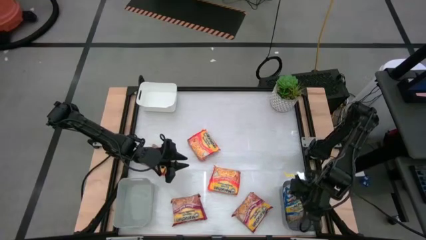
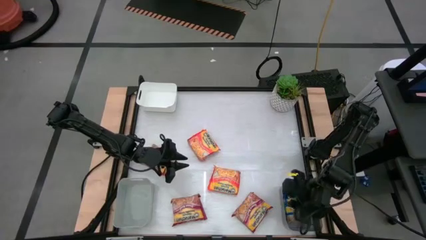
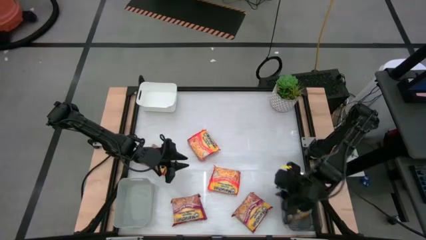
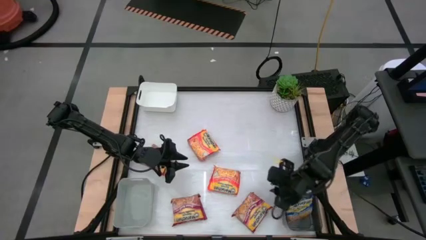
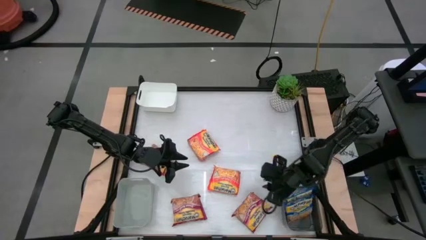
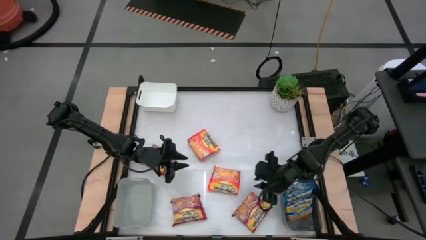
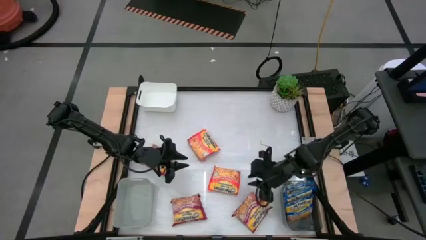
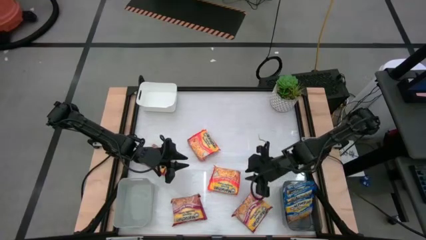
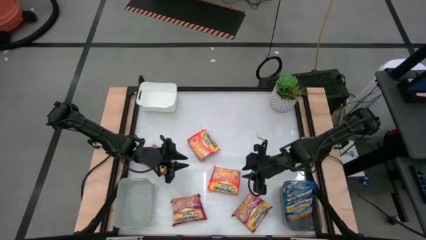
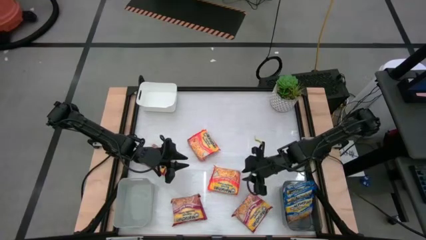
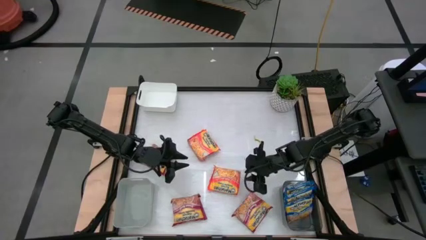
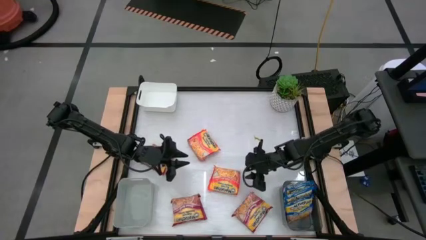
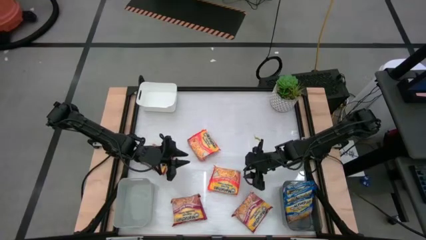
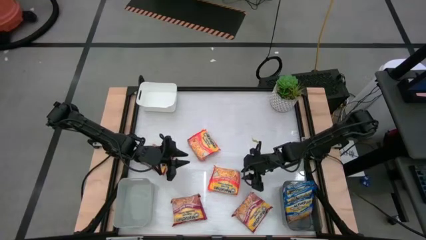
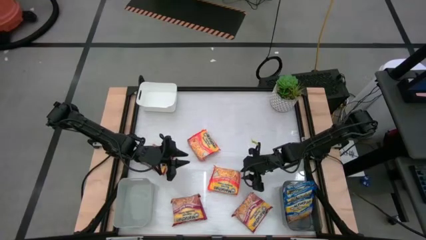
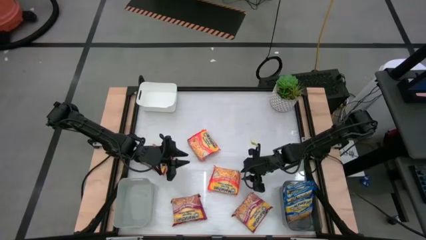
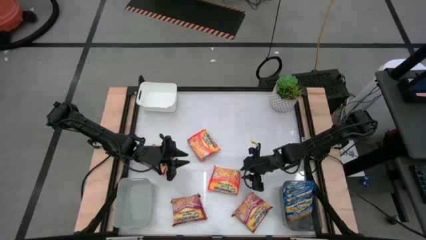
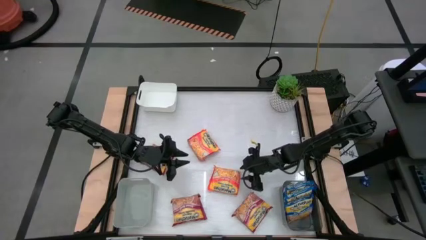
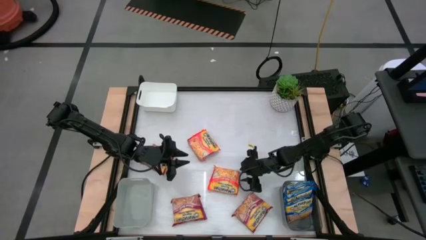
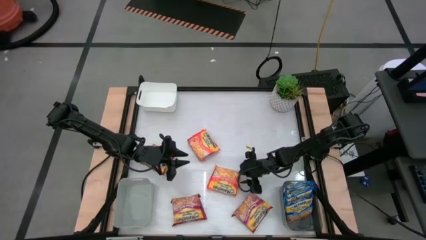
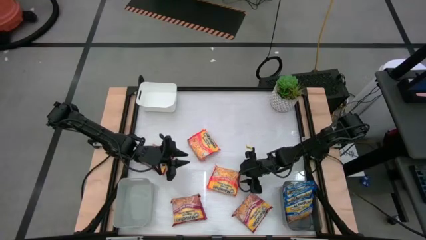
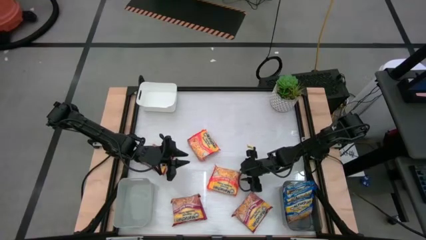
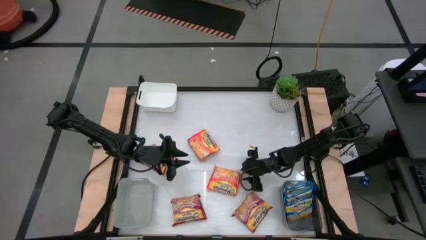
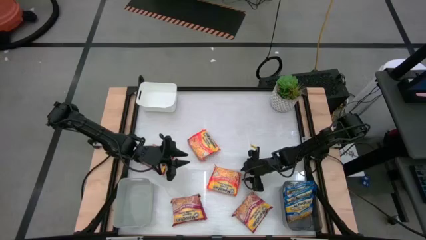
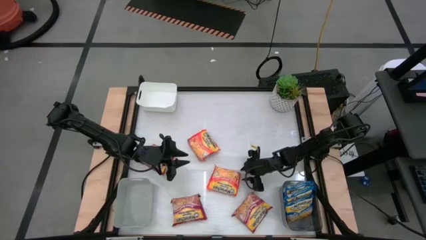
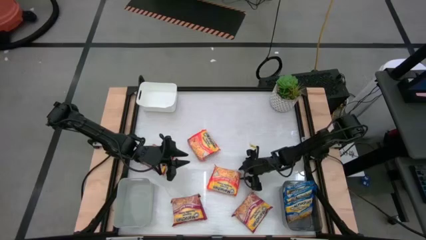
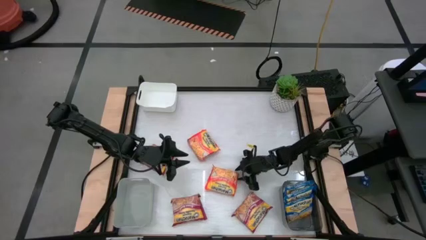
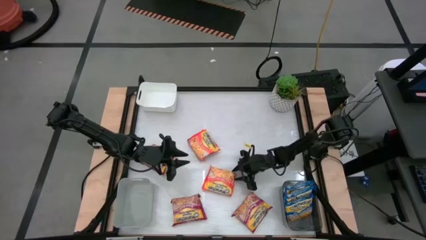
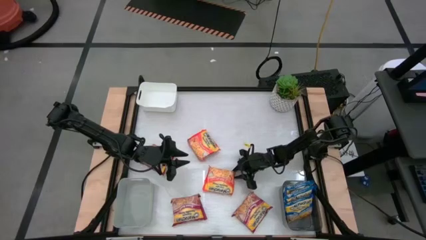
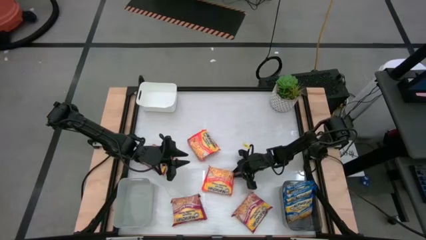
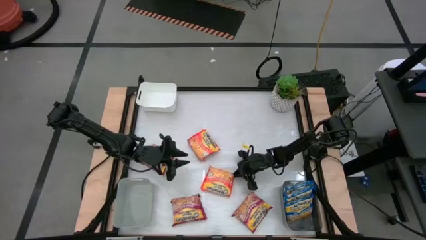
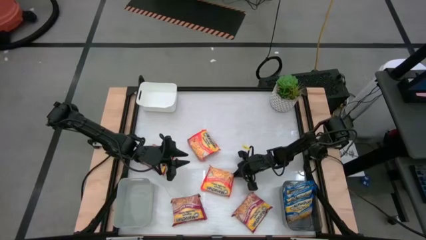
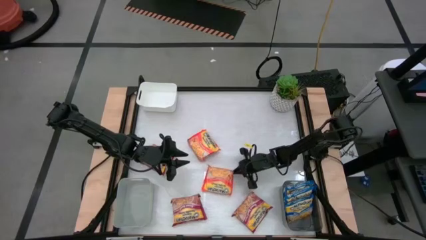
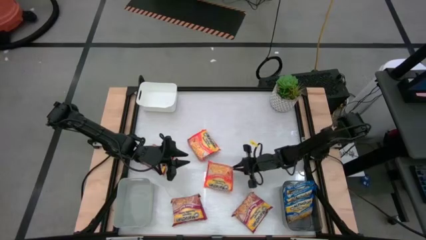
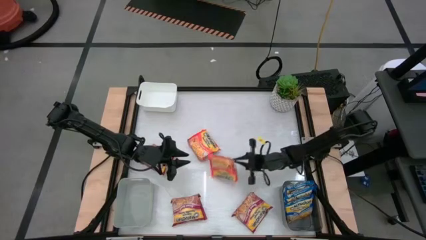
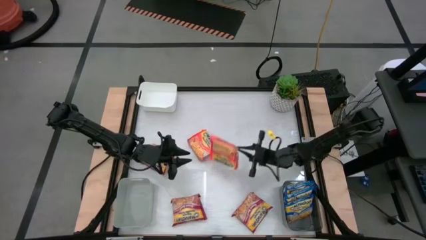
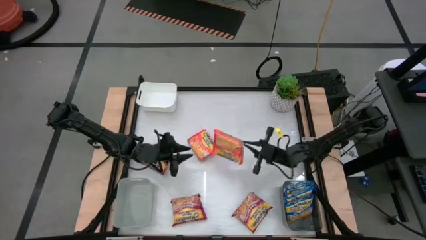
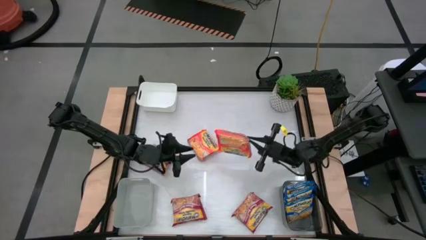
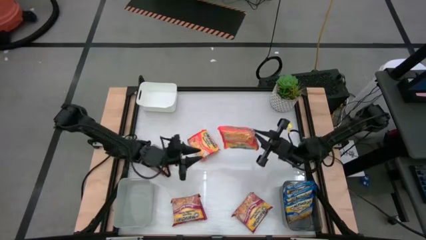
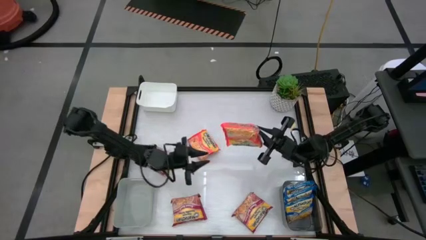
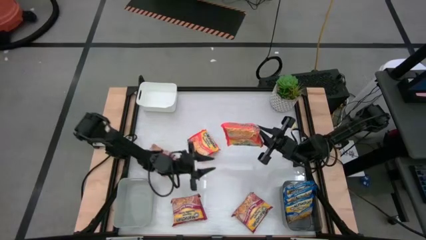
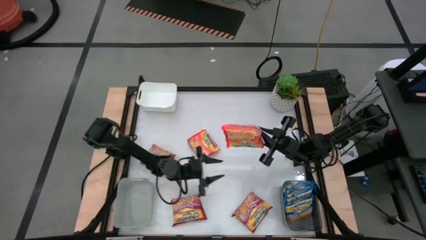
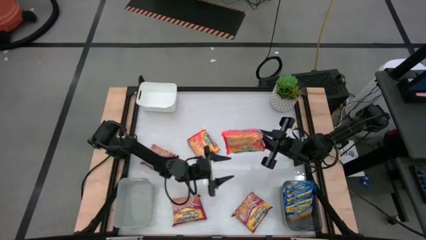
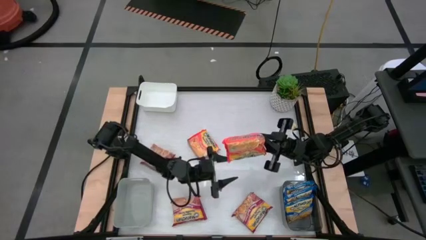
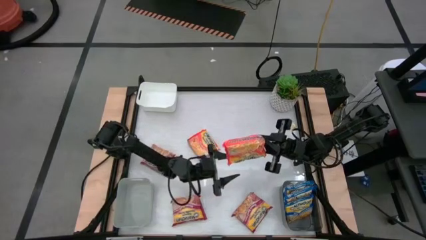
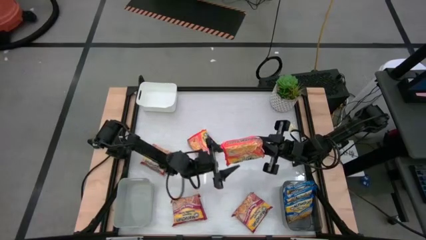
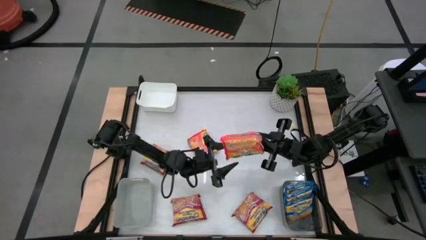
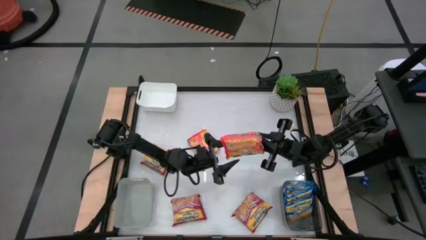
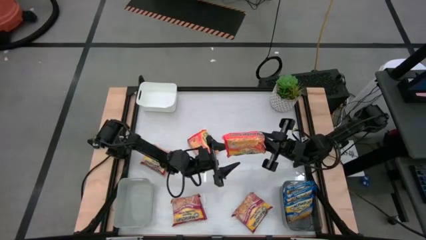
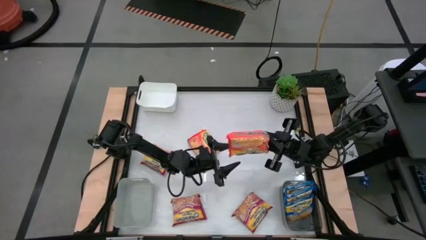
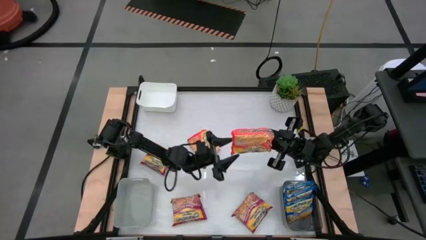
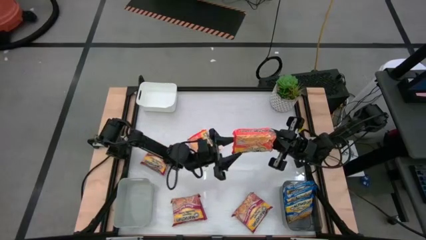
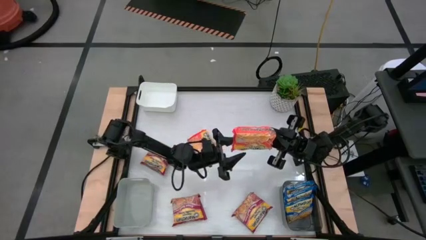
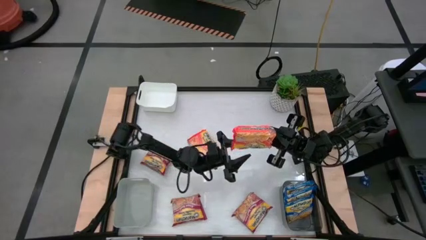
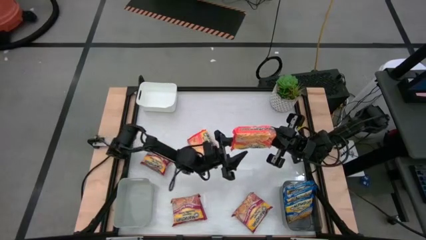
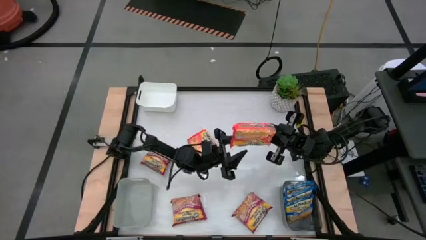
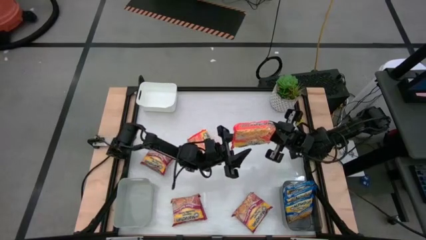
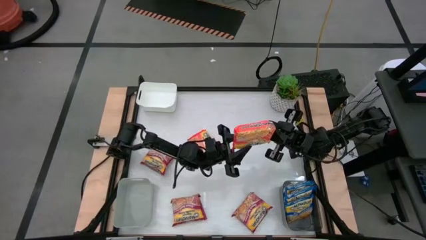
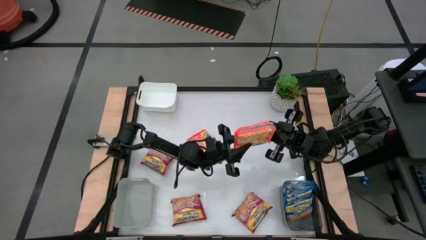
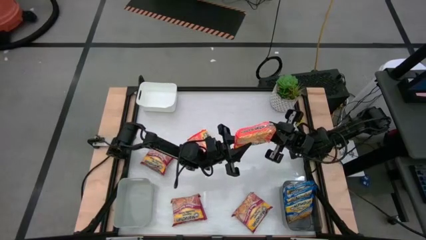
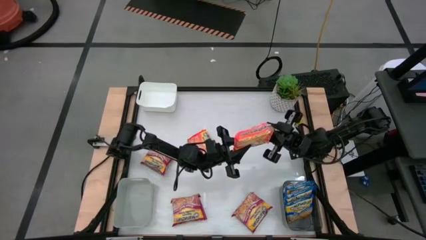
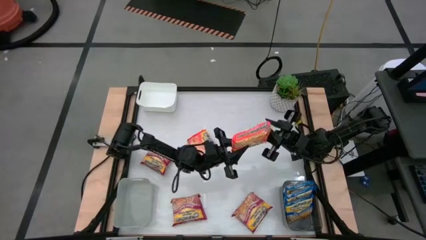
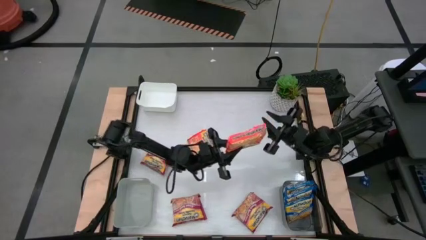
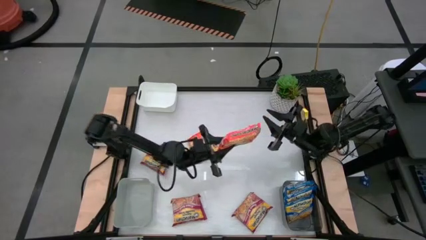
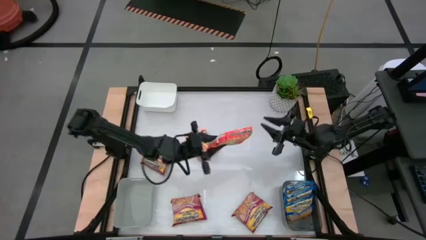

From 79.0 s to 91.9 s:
Task: Sort Maruchan noodles
Put the bottom orange noodle pack into the white bin

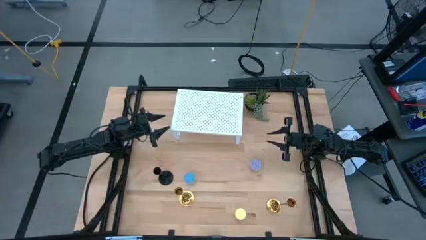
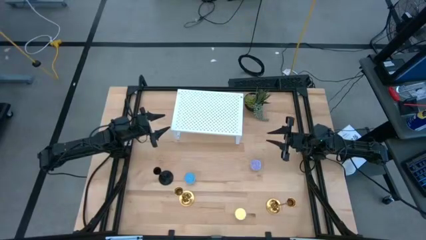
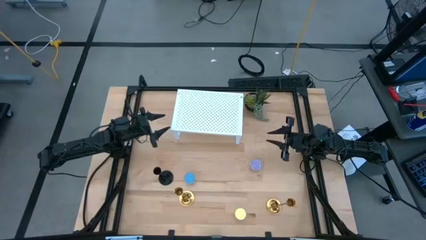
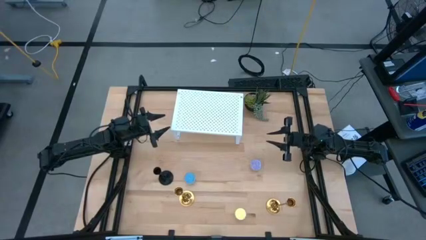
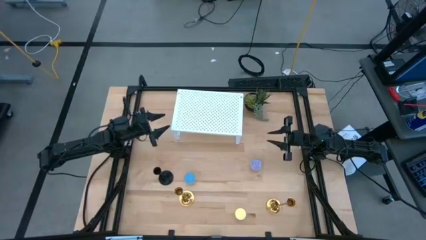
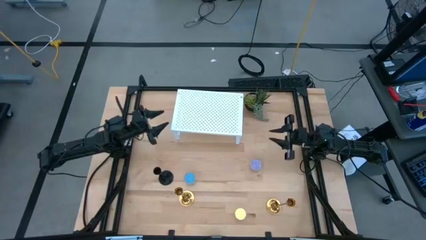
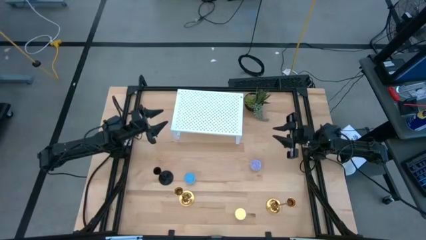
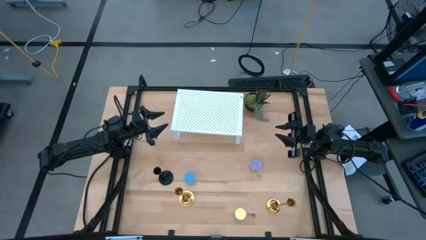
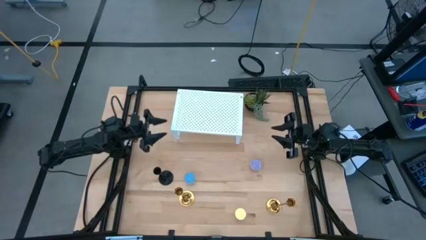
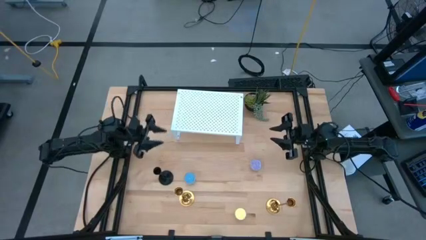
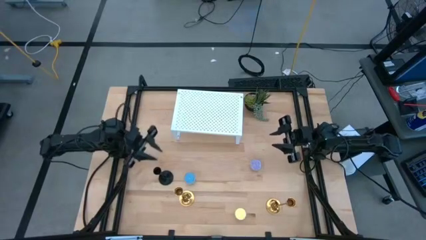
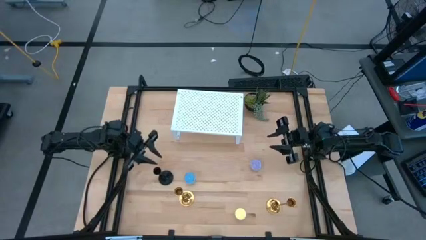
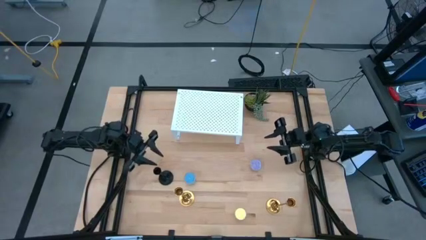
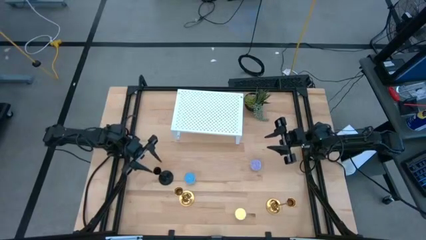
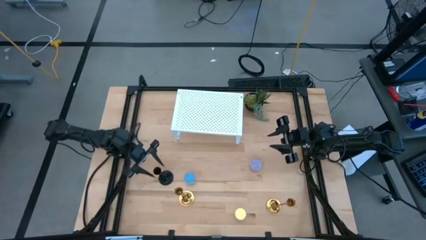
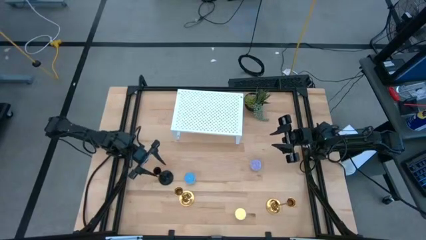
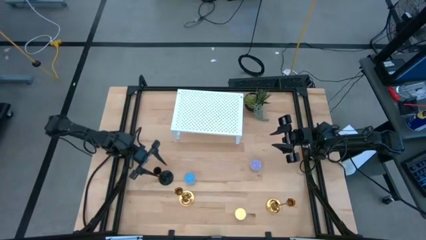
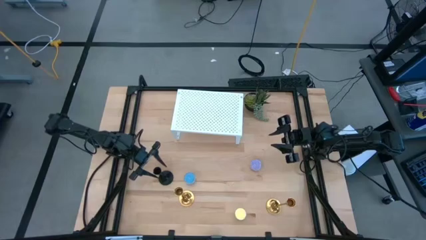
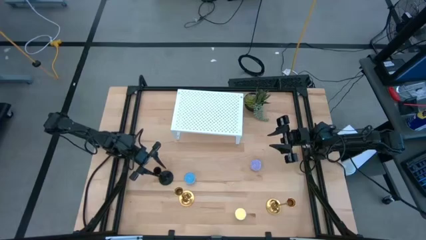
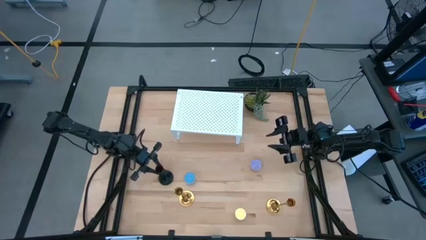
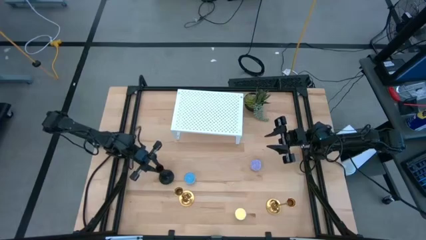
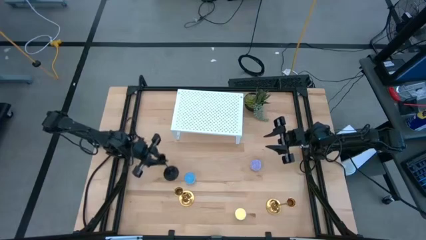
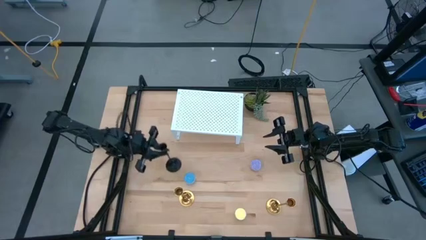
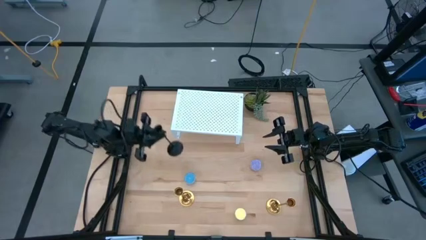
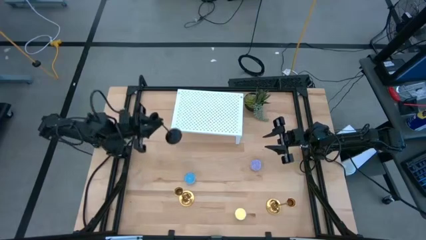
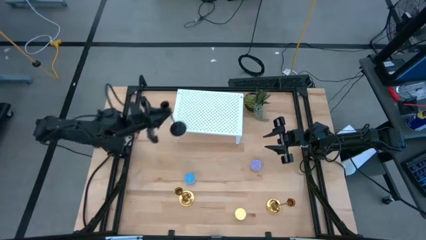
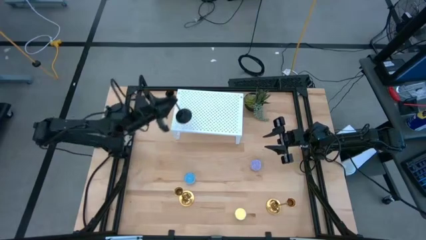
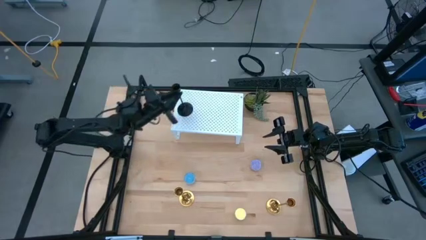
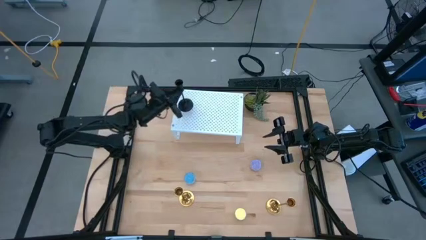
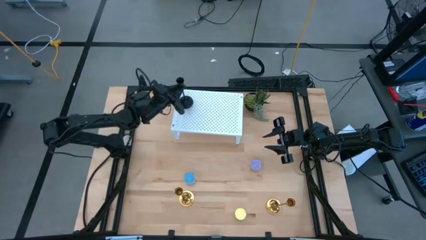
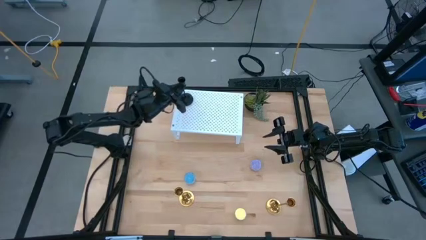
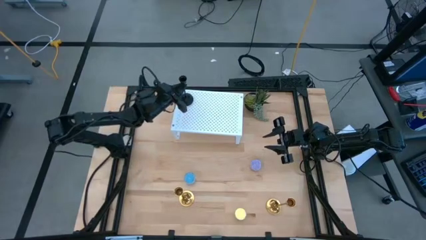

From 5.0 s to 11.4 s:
Task: Pick & Place candle stick holders
Put the black candle holder on the shelf
